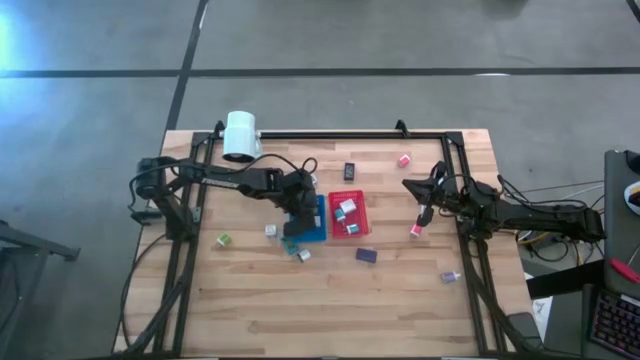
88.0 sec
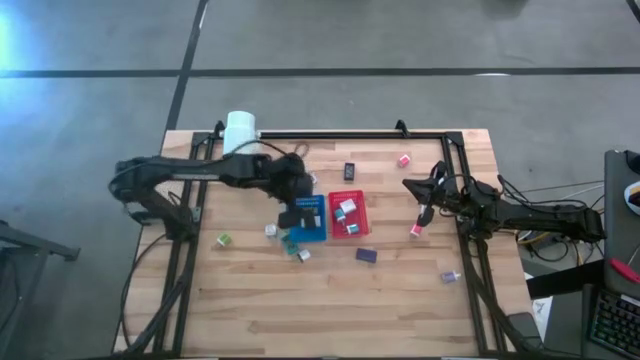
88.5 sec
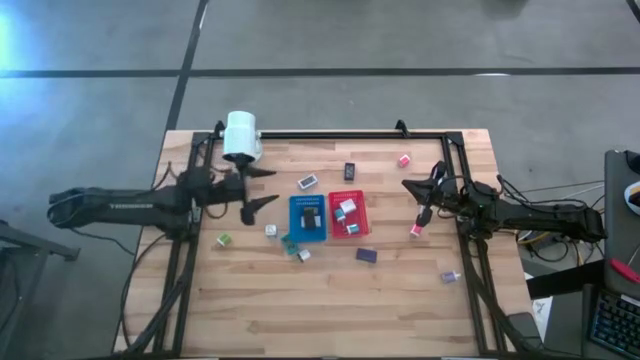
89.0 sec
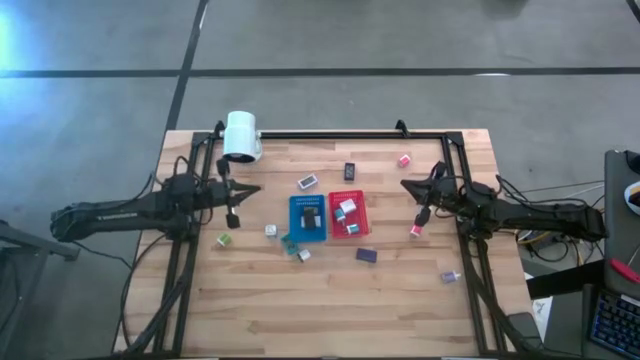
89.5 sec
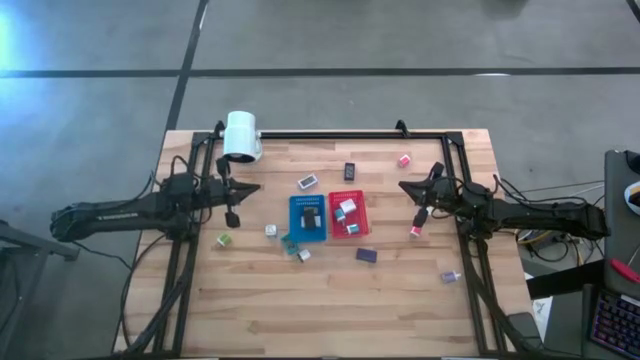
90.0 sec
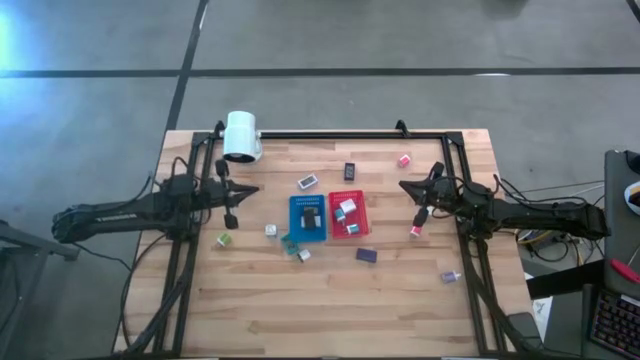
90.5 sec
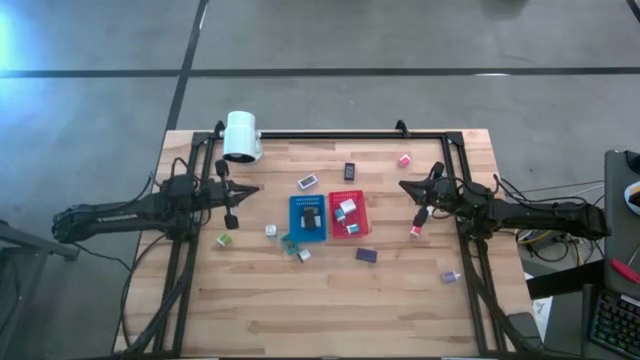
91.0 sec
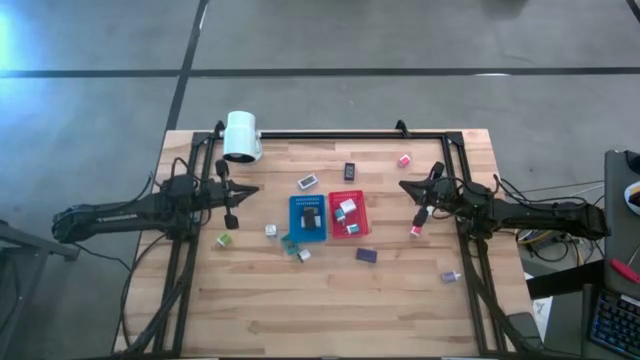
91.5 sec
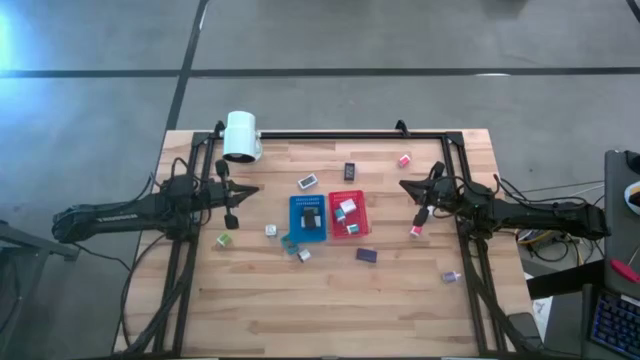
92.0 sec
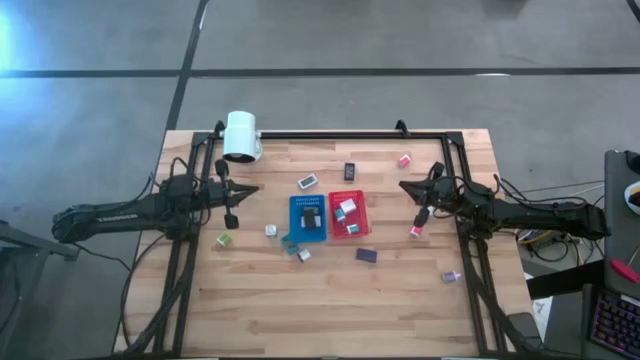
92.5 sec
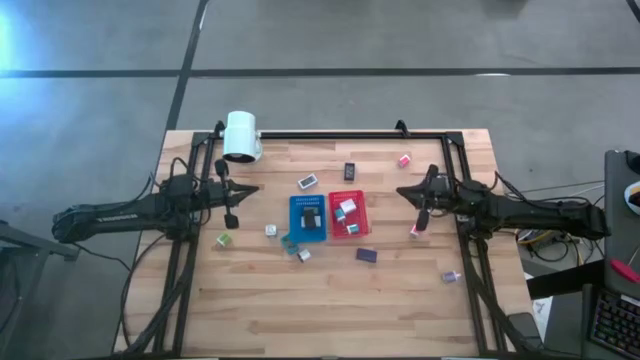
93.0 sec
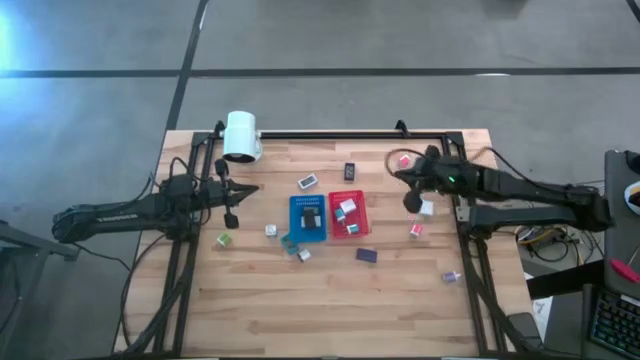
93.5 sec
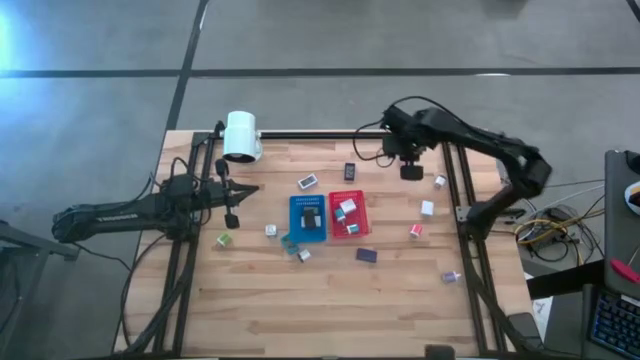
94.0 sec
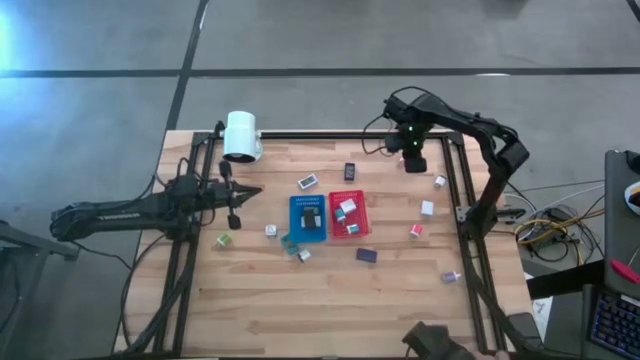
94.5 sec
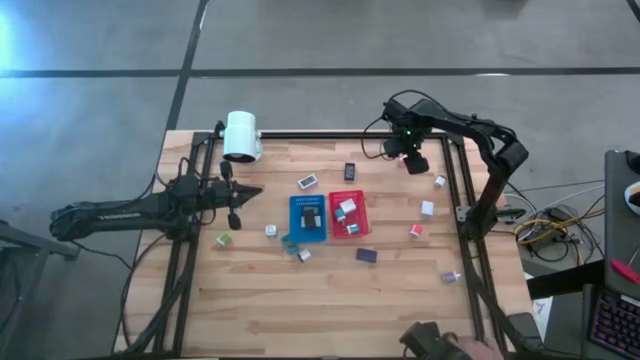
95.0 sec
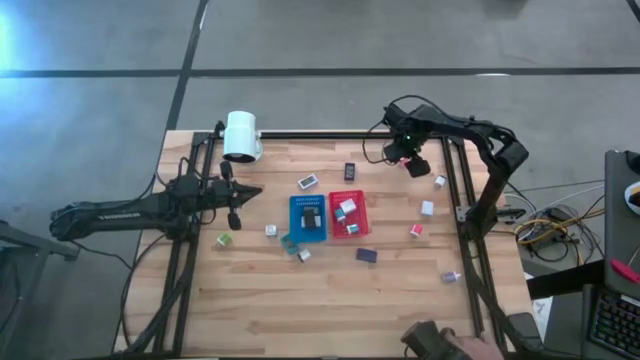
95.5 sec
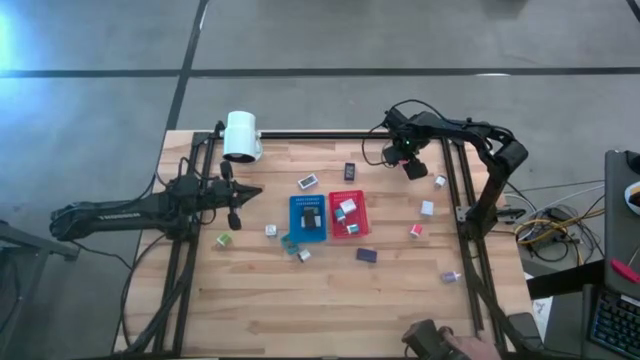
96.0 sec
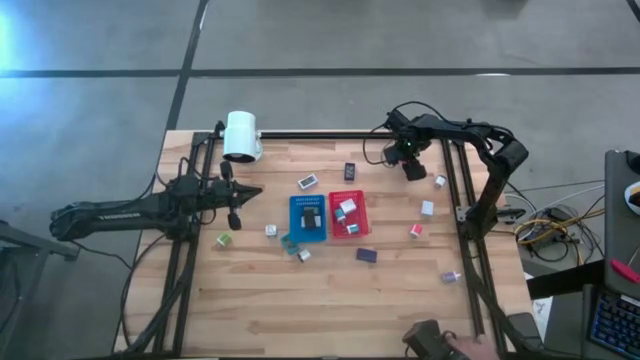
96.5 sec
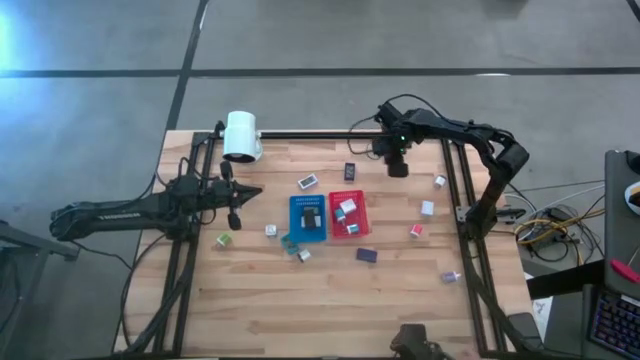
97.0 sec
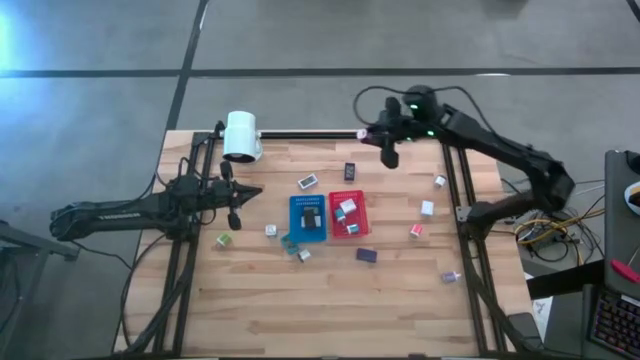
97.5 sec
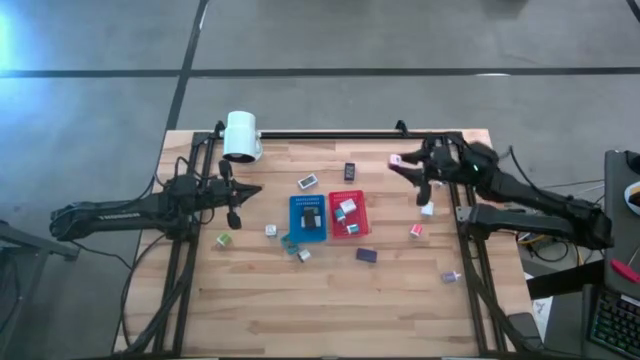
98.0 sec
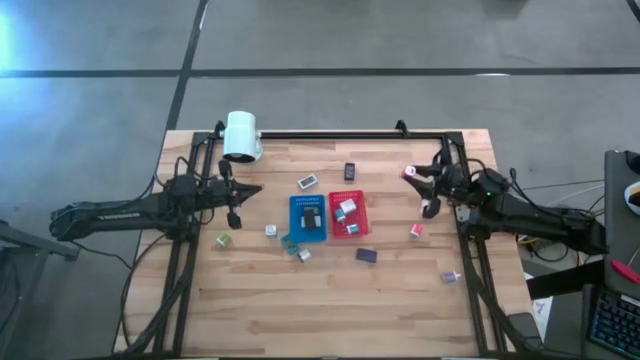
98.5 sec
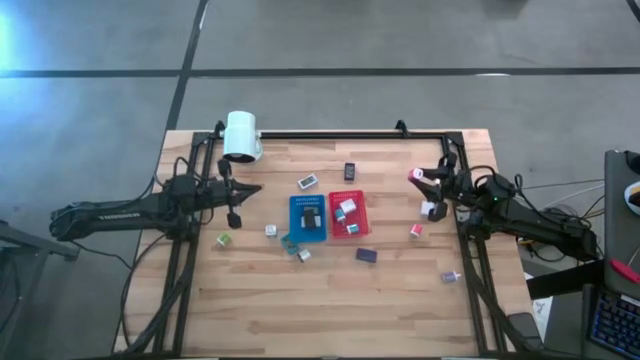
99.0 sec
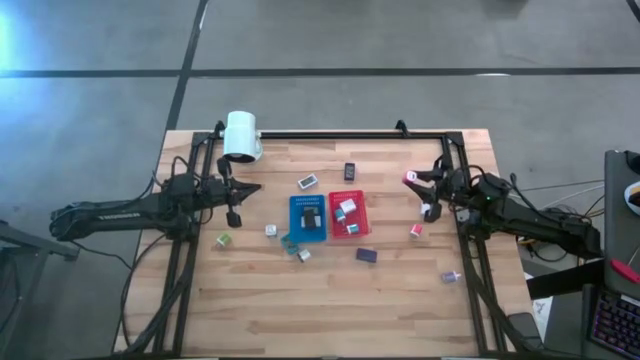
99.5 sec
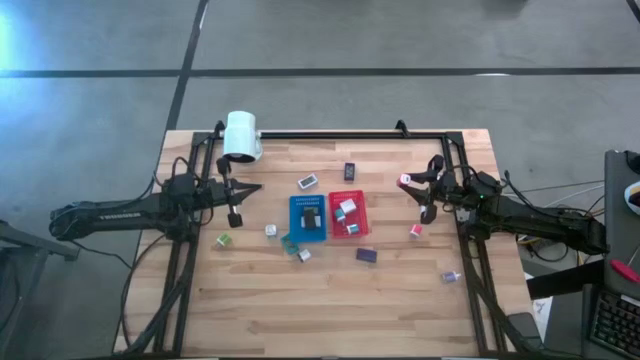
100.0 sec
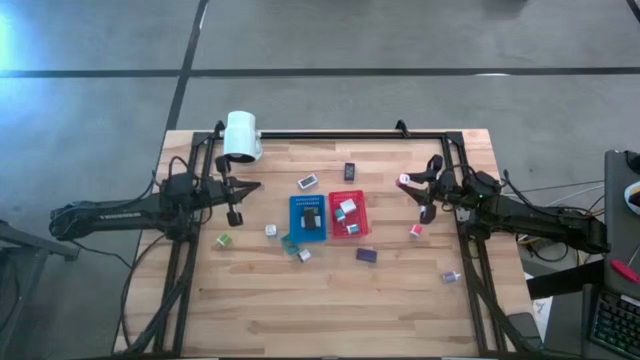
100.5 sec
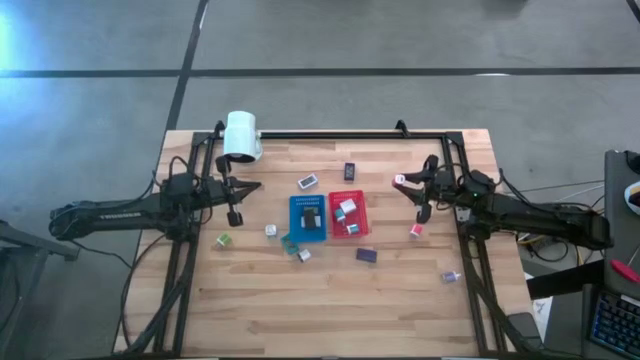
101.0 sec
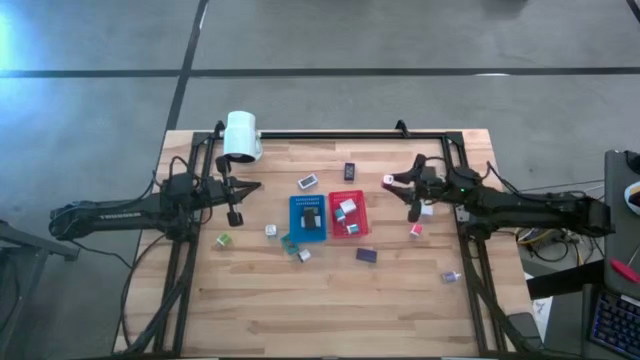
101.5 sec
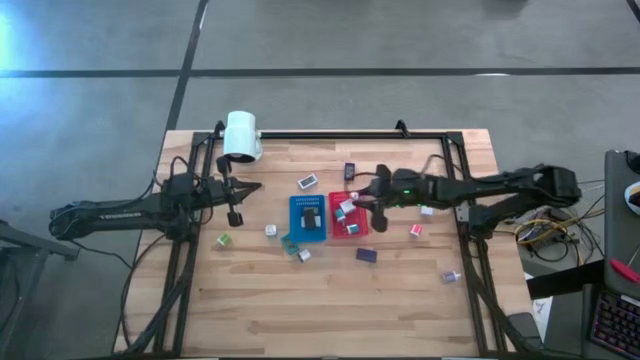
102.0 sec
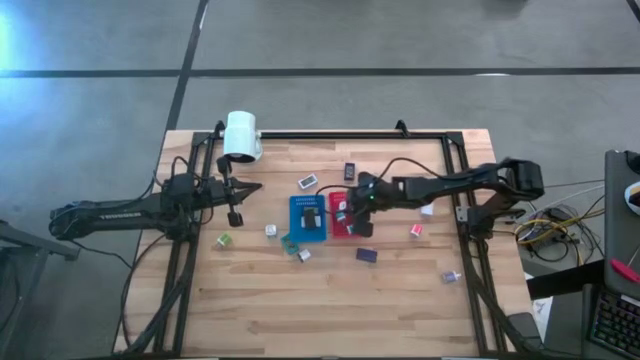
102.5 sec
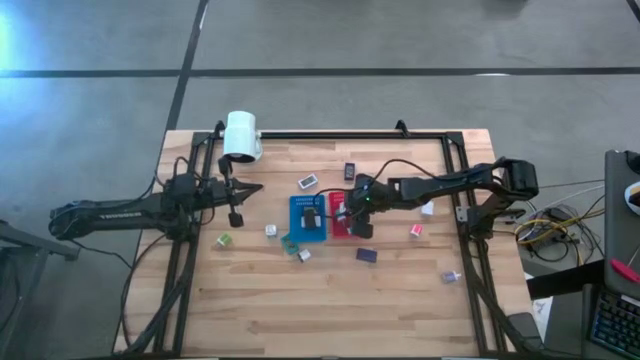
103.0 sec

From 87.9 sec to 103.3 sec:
Task: Pick & Place Office items
Put the top pink adaptor into the red bin

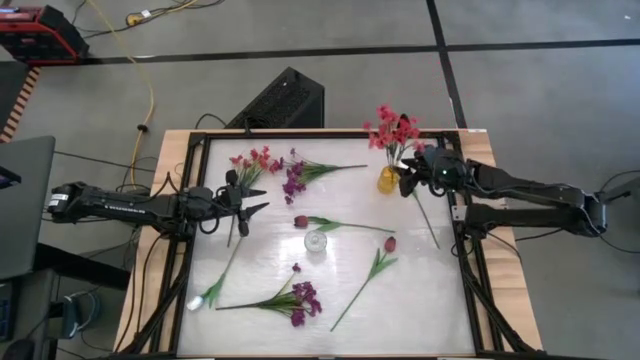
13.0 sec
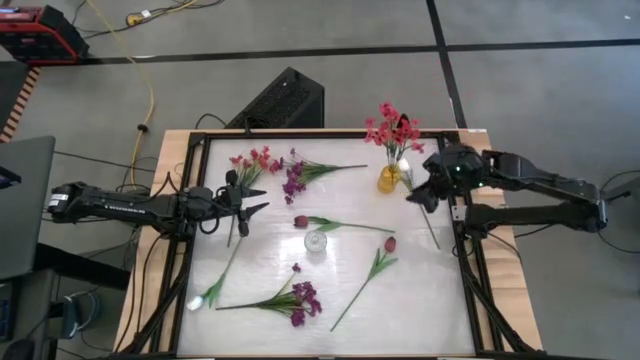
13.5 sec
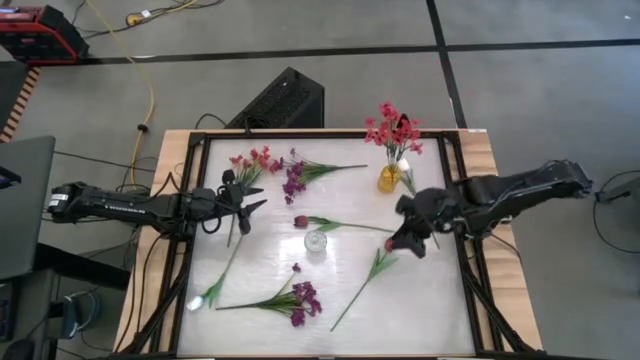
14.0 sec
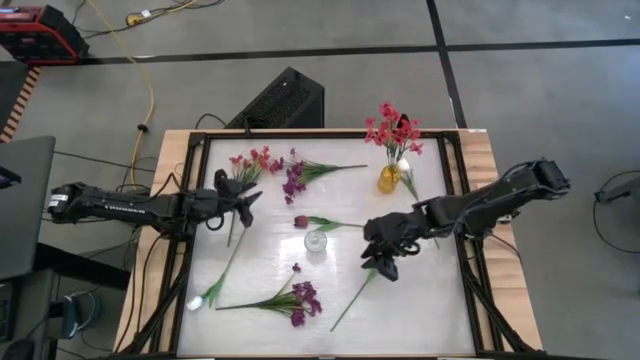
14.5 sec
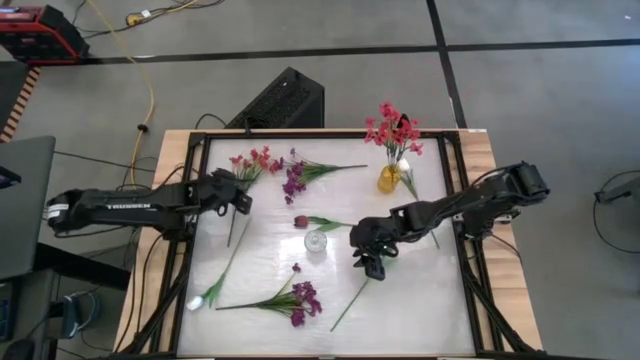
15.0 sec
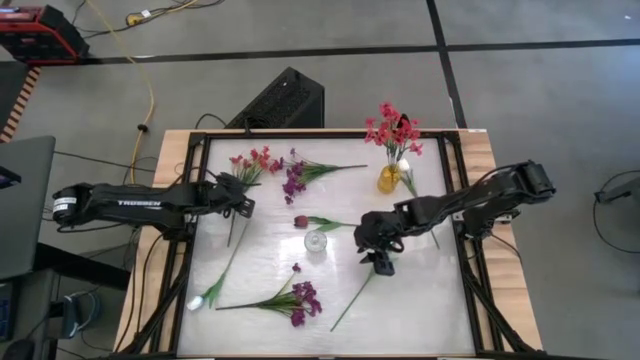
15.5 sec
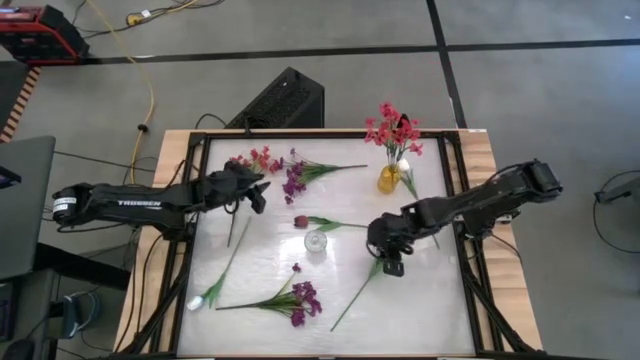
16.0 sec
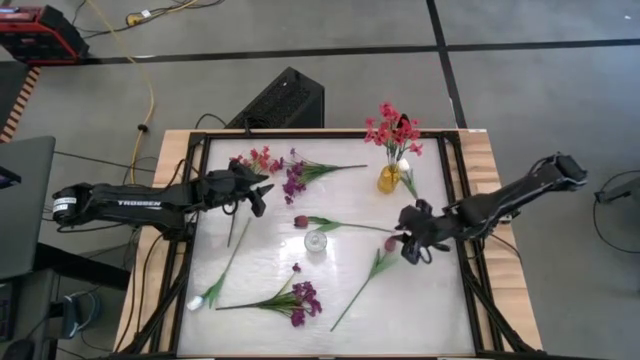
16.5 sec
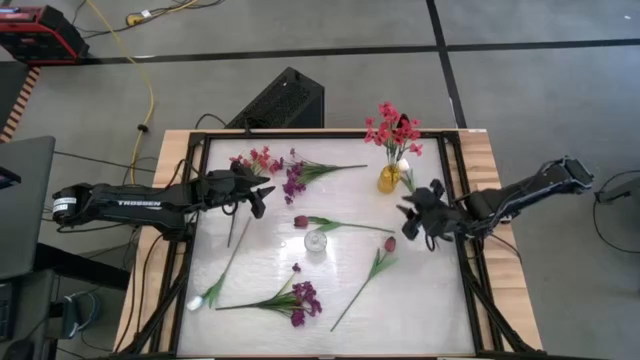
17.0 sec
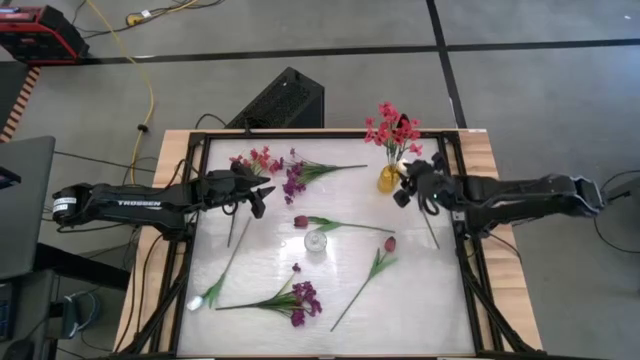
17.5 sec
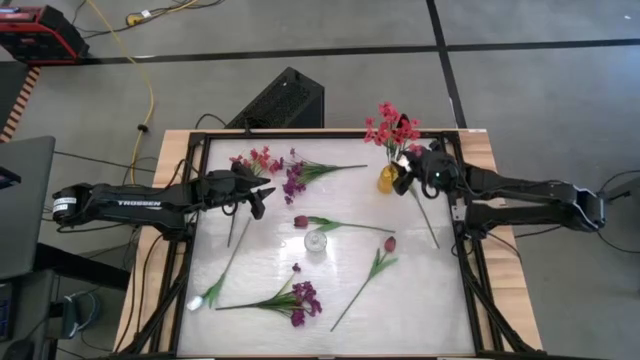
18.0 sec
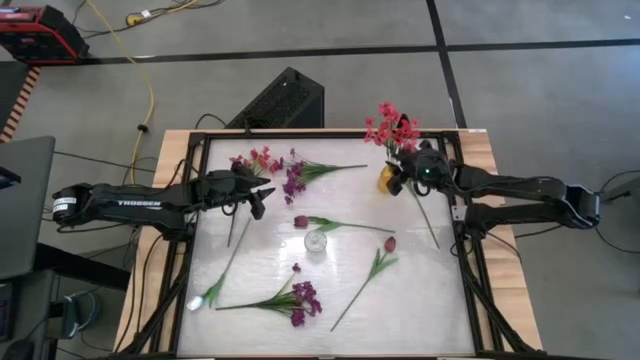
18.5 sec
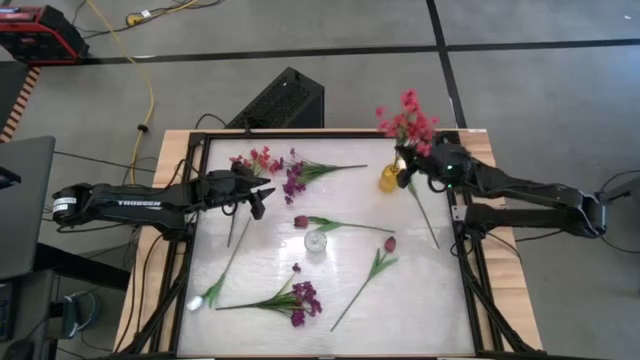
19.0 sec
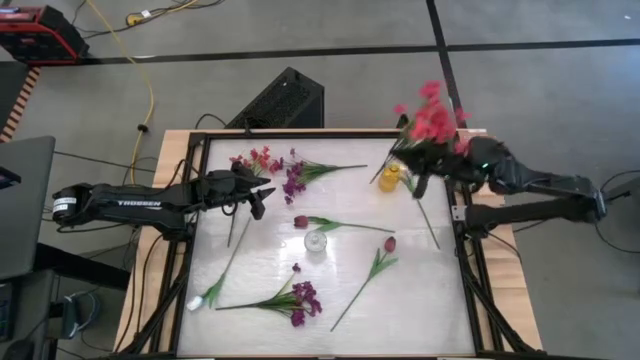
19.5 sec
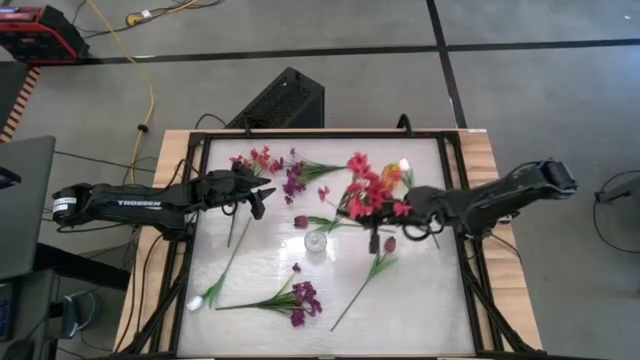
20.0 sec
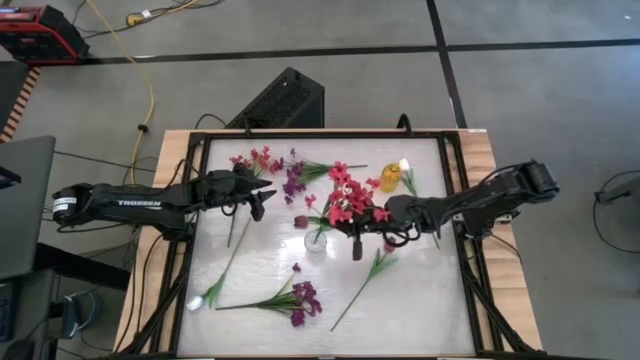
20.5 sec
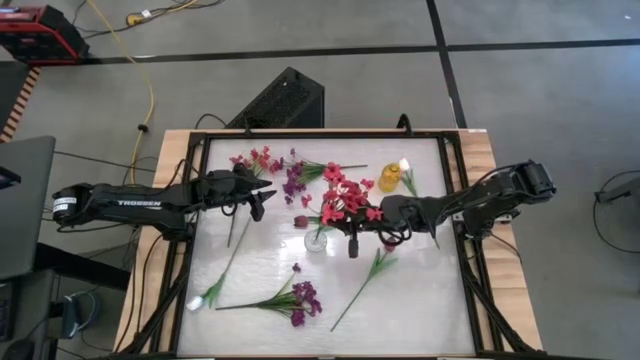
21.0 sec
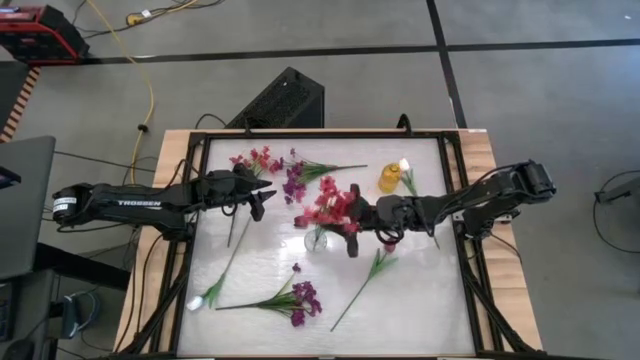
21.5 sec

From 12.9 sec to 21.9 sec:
Task: Sort flowers into vase by color
Put the bottom pink flowers into the yellow vase
